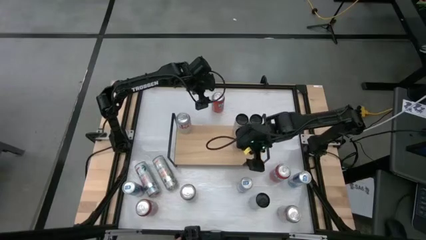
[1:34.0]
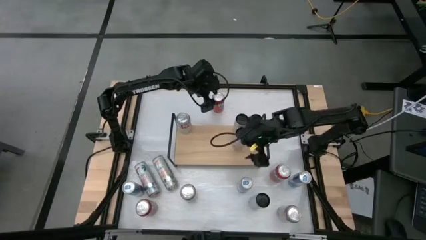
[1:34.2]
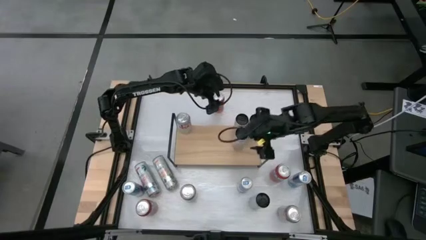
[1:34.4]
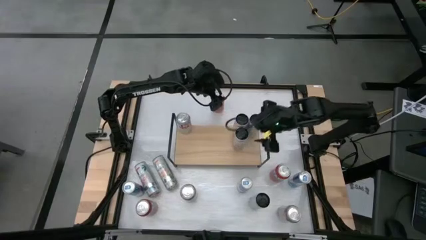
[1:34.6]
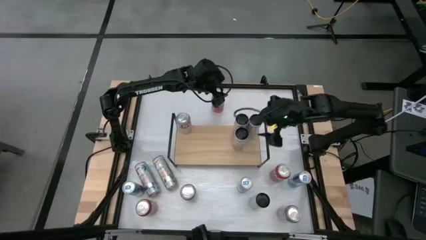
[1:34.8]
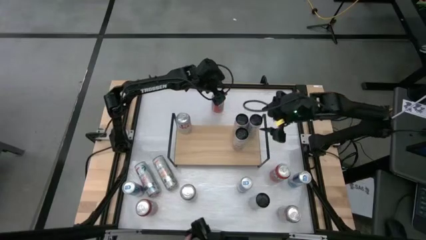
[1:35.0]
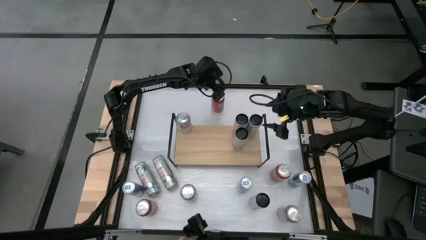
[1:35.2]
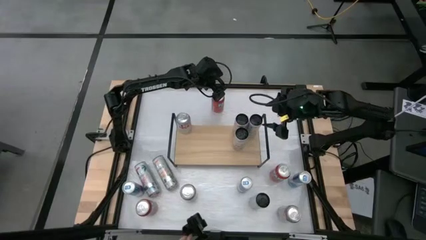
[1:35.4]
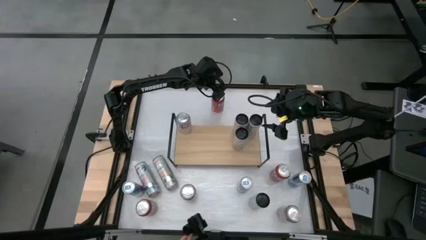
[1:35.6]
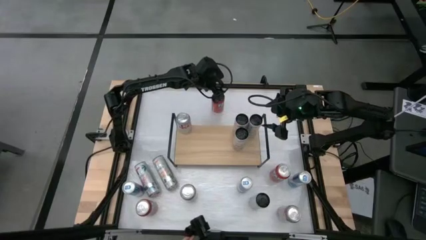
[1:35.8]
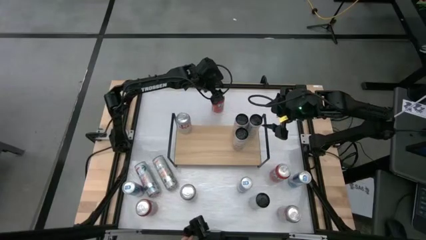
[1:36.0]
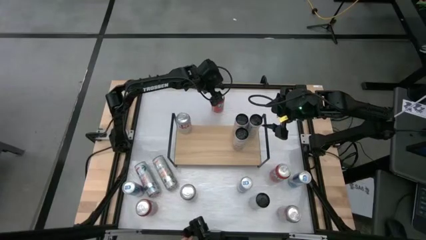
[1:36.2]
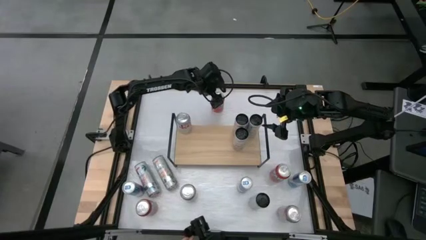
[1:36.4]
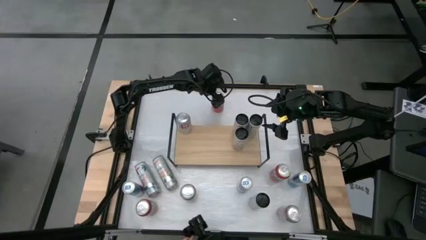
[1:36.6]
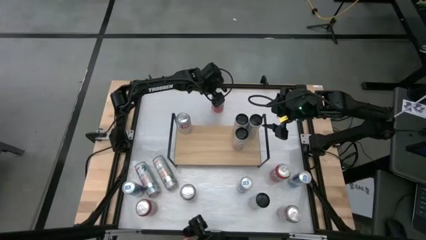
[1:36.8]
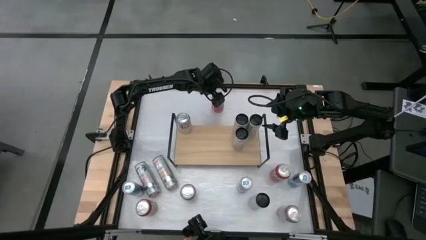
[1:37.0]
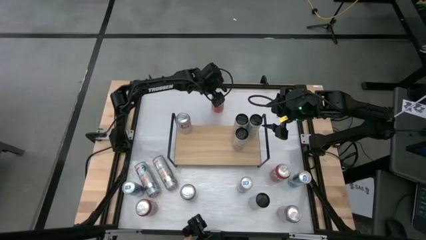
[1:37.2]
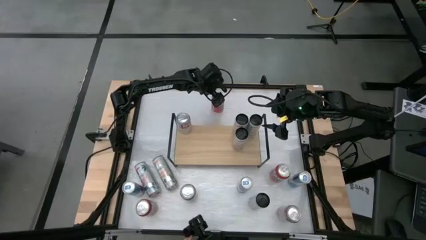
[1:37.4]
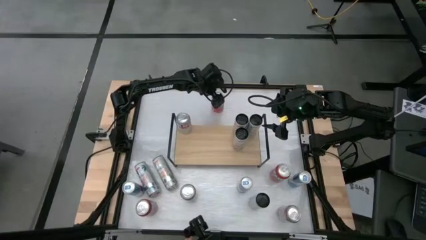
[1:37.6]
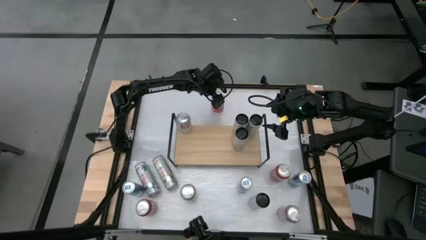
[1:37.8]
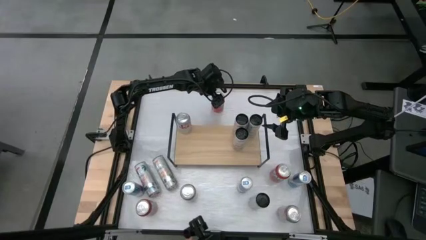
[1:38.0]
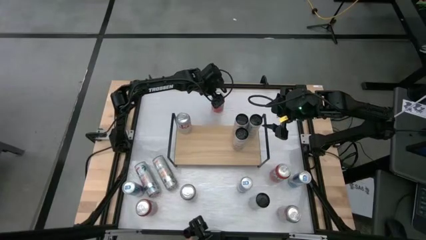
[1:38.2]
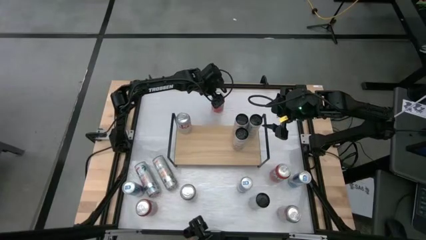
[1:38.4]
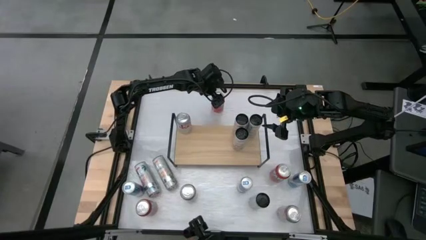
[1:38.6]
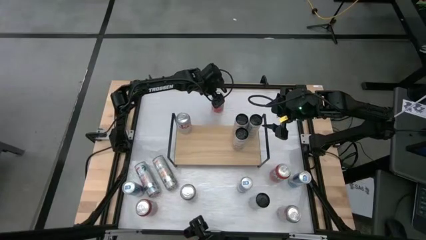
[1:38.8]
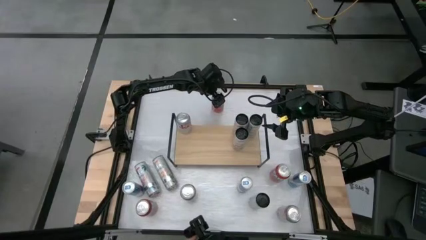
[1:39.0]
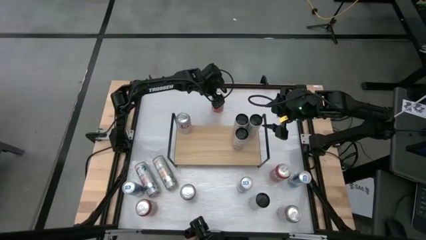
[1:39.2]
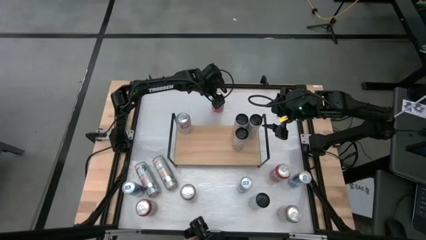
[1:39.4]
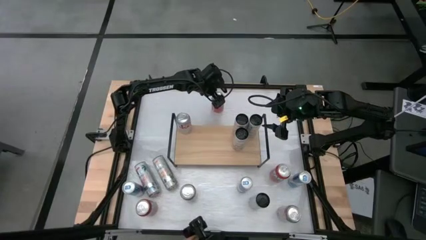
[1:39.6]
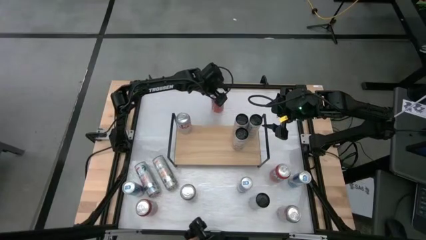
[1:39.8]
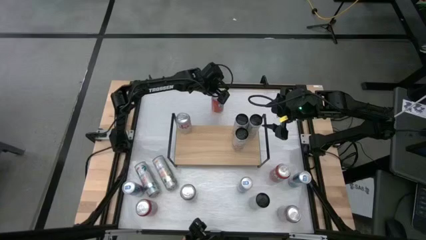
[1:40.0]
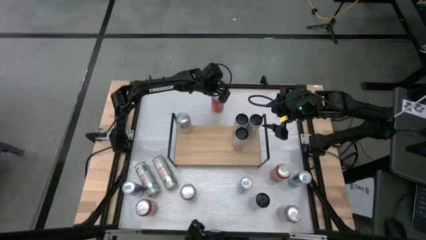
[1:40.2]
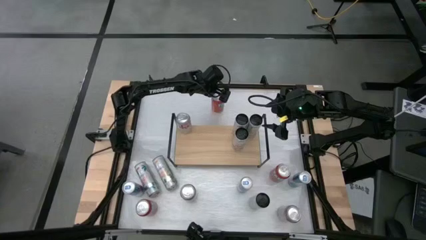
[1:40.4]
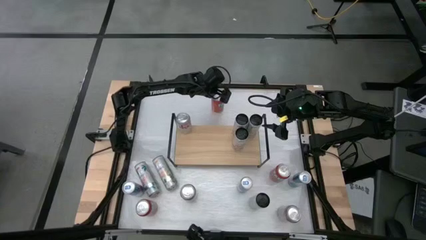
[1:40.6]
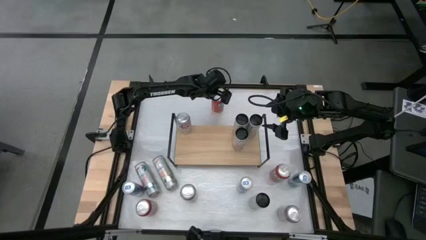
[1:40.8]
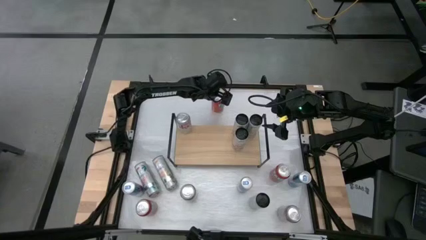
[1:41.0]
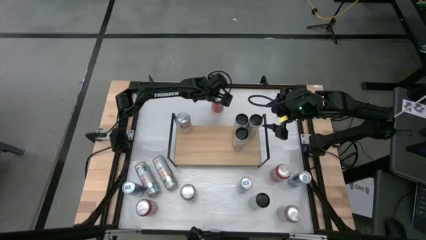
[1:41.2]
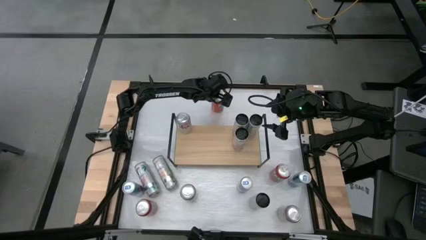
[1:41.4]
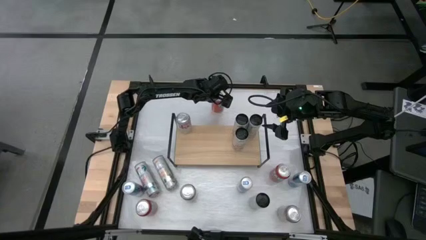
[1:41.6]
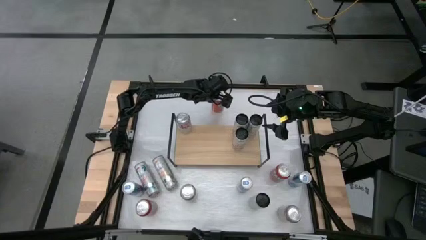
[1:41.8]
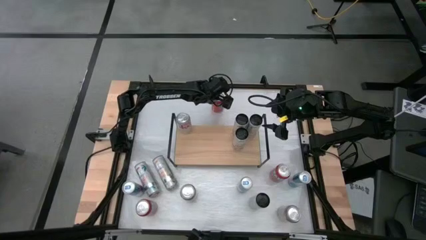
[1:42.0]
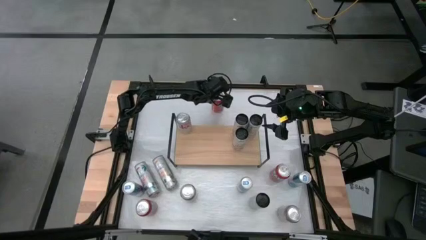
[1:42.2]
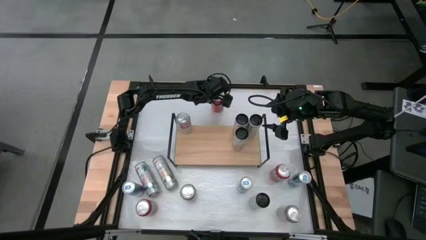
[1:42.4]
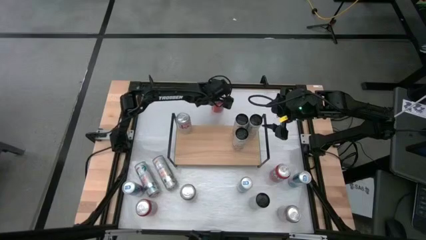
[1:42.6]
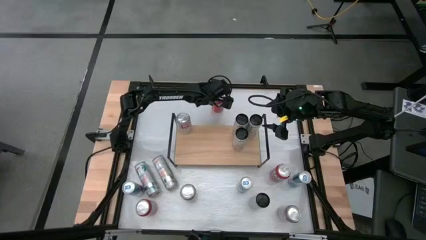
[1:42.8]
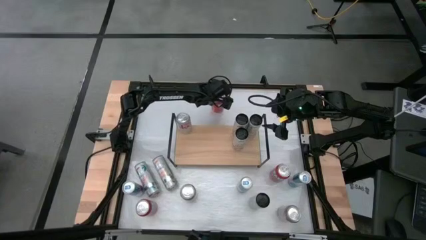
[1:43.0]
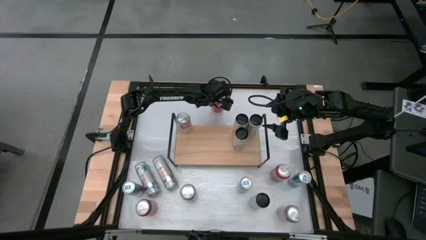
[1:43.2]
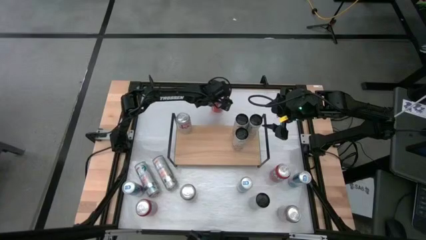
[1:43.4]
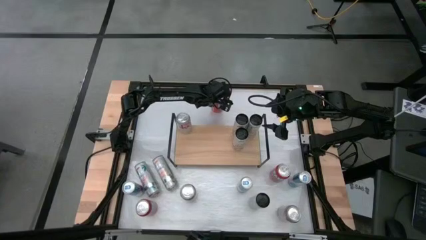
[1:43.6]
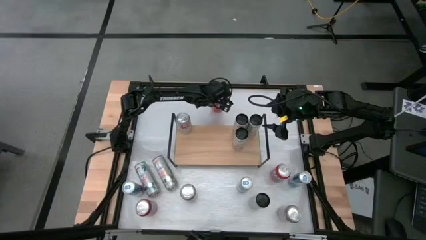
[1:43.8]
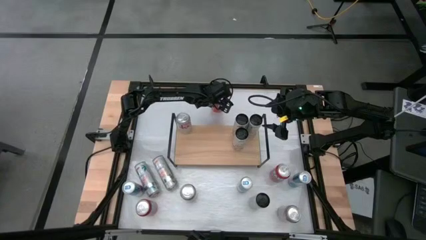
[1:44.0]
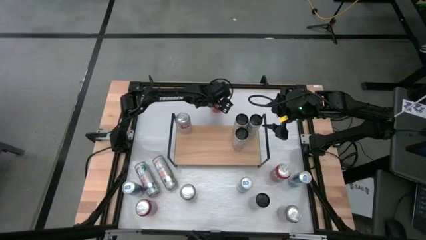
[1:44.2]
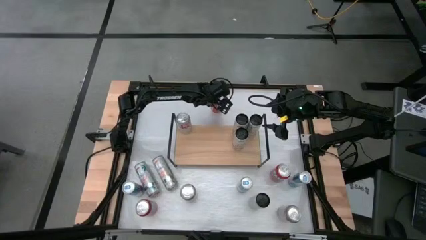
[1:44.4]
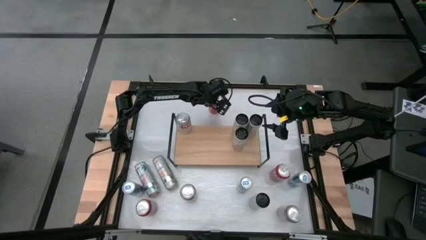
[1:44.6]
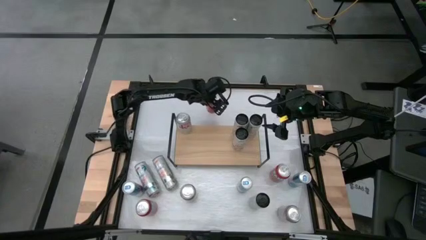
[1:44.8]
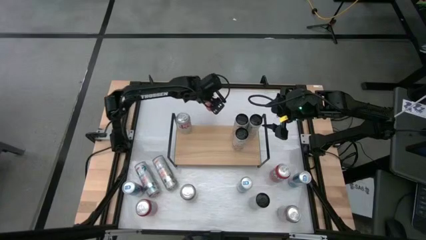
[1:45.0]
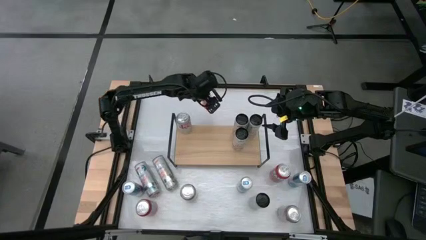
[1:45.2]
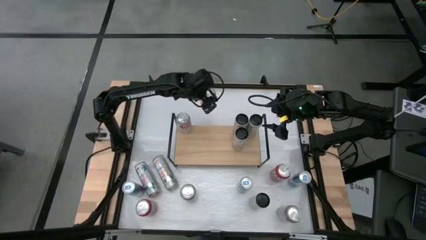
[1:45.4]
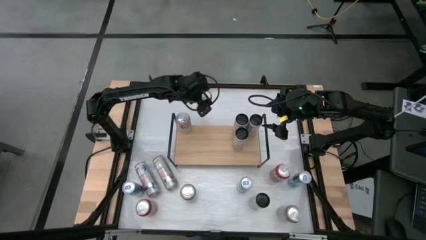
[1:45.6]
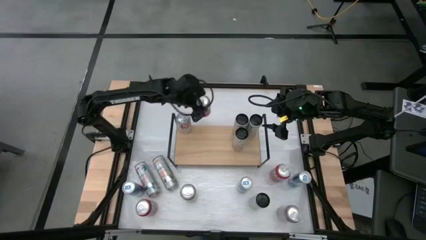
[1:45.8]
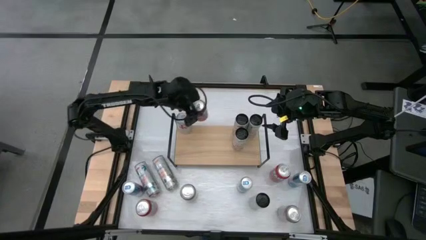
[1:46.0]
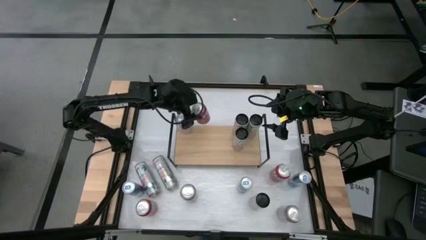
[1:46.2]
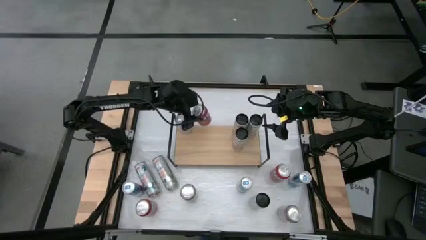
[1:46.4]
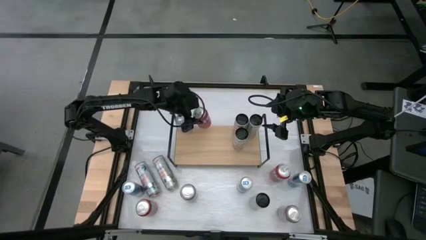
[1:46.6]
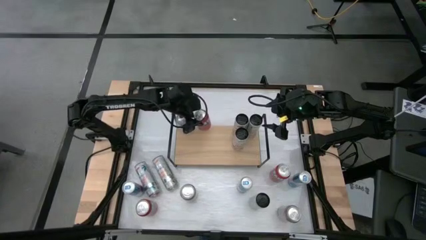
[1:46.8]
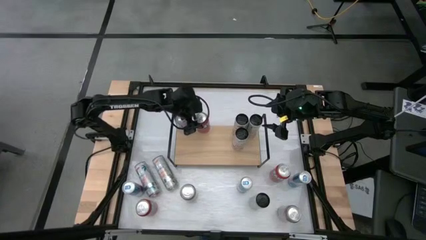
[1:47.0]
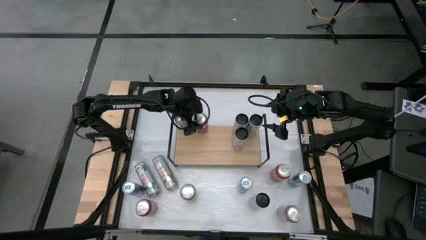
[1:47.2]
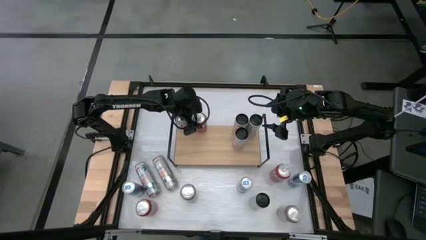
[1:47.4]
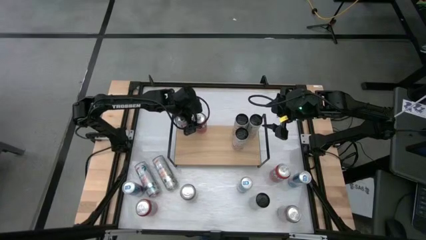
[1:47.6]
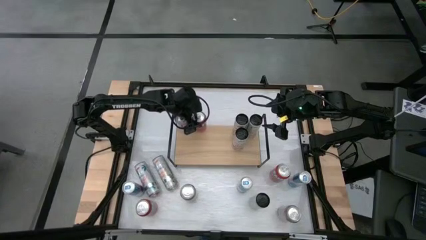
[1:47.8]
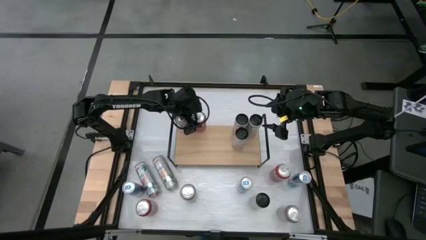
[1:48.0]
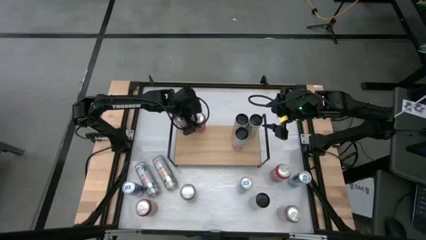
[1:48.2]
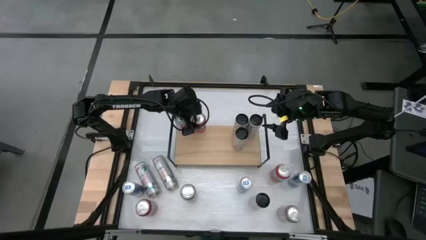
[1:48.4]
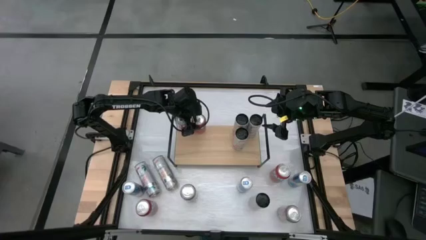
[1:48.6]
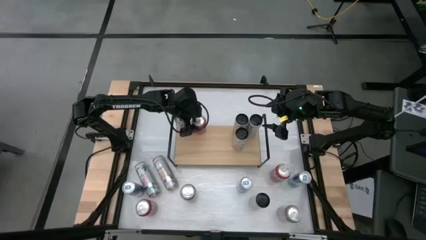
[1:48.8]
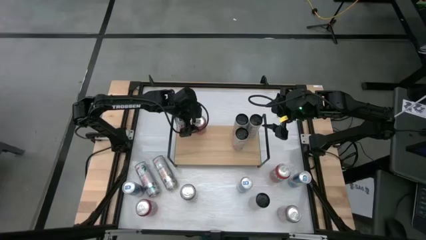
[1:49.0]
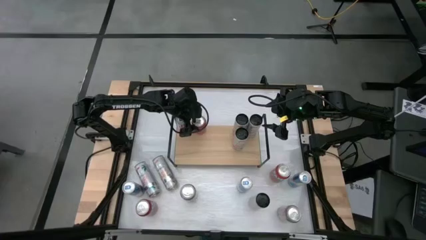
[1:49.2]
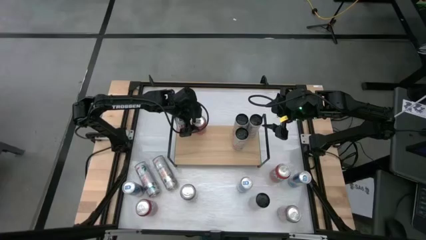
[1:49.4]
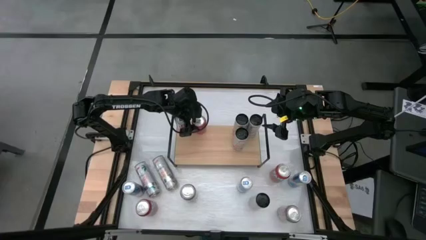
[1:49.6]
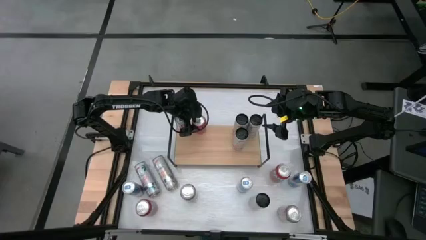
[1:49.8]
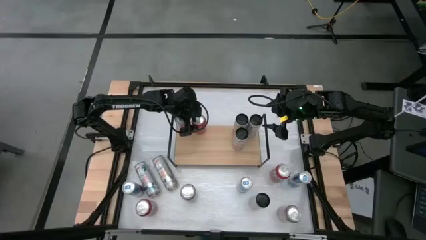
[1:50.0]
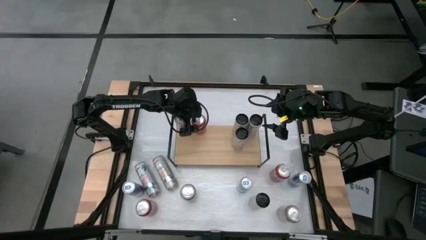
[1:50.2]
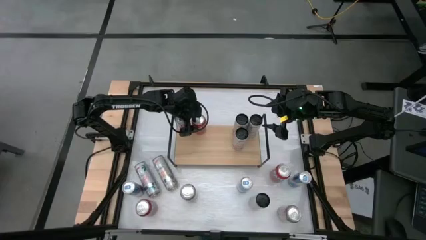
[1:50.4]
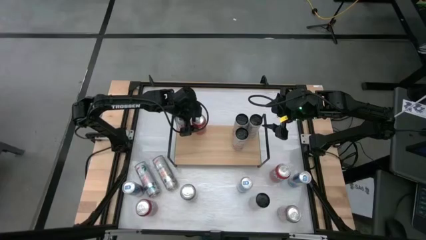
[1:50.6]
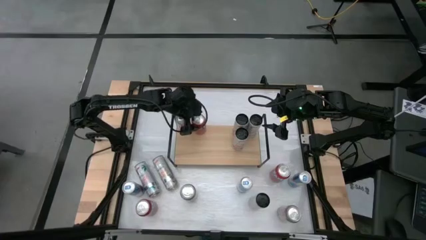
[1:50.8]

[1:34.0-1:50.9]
Task: Place canned beverage on shelf
Put the top middle red soda can on the shelf
